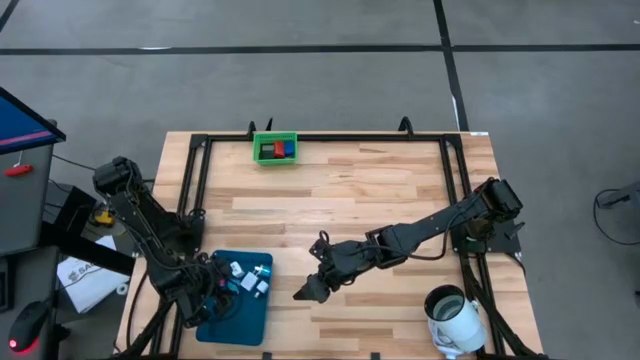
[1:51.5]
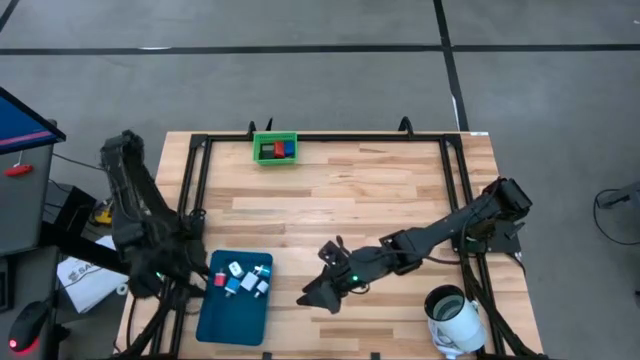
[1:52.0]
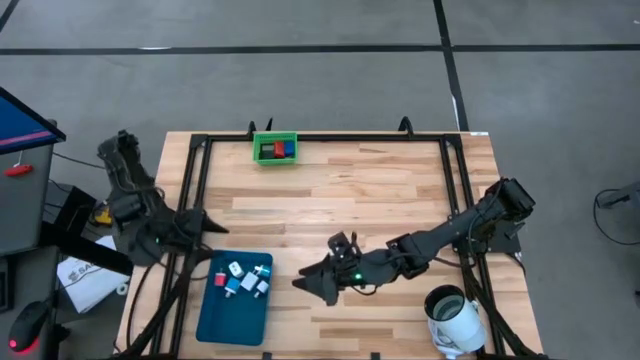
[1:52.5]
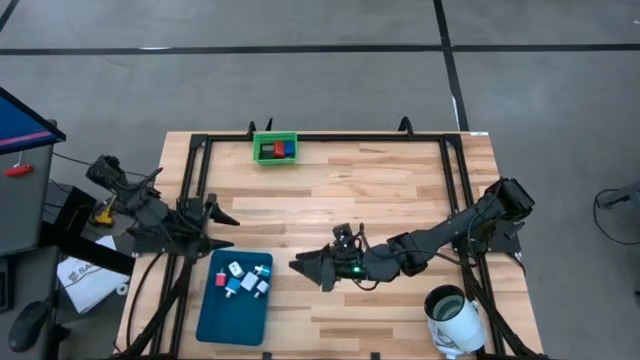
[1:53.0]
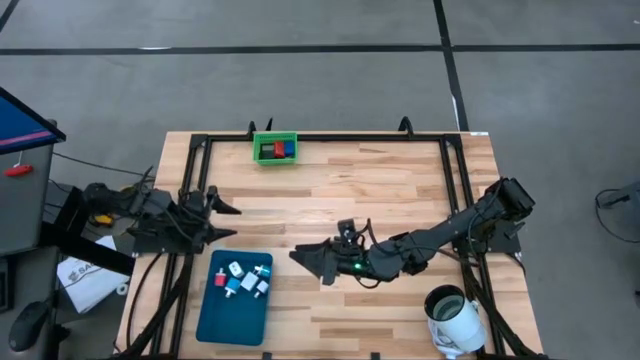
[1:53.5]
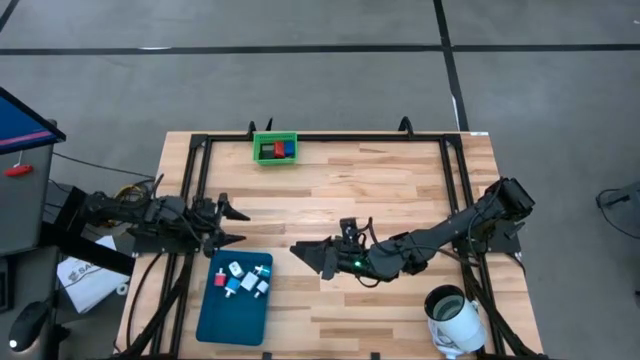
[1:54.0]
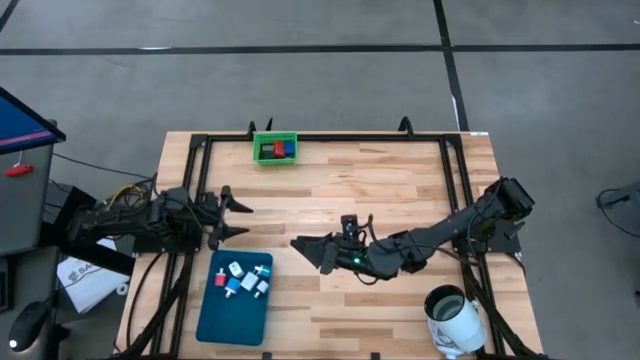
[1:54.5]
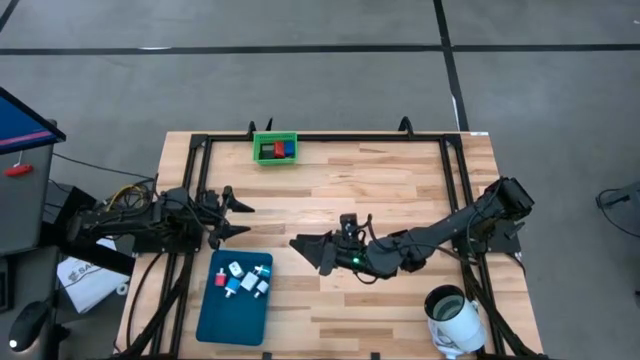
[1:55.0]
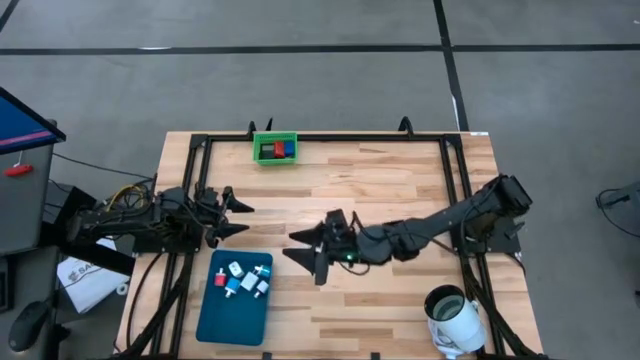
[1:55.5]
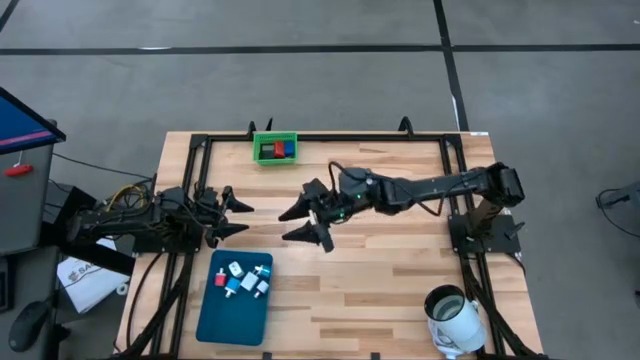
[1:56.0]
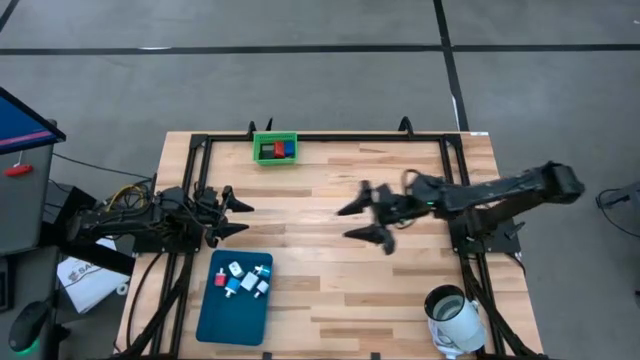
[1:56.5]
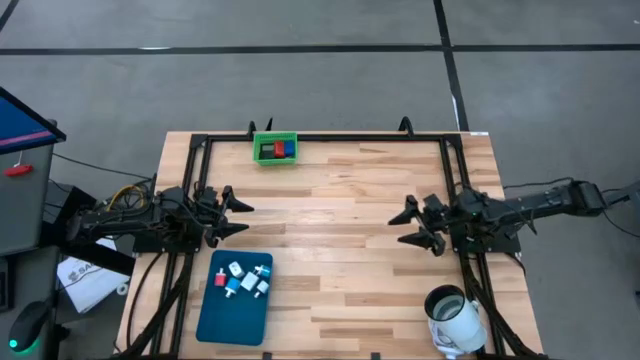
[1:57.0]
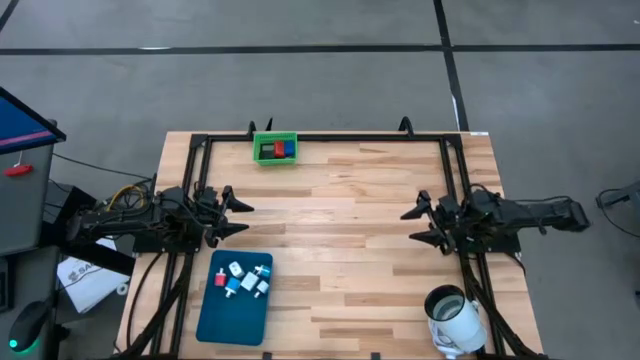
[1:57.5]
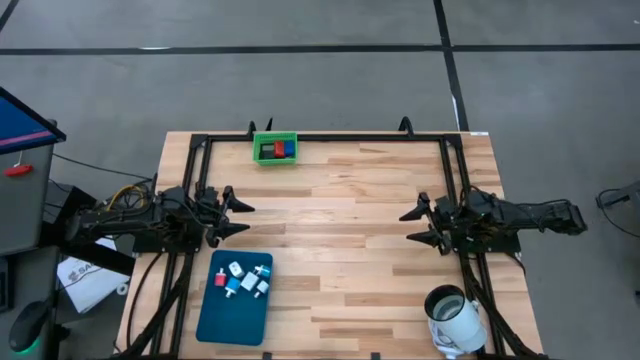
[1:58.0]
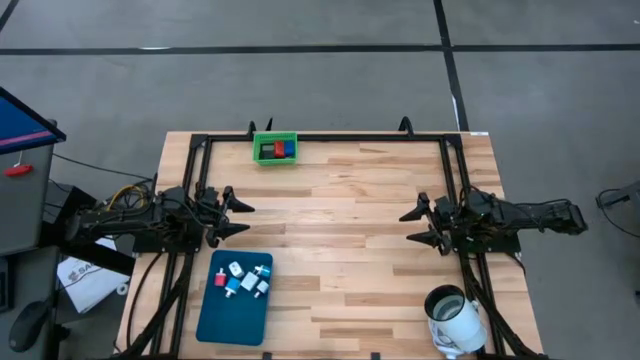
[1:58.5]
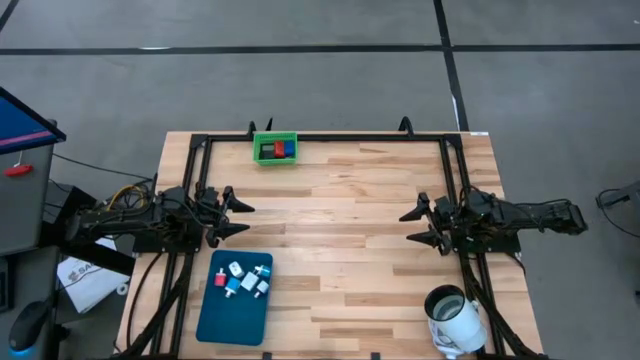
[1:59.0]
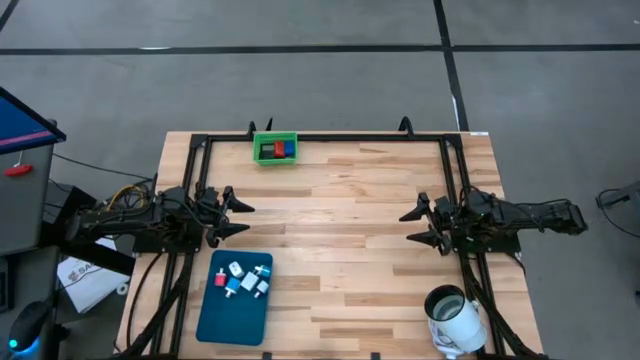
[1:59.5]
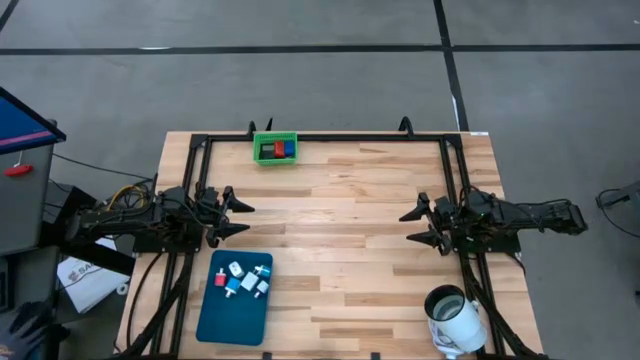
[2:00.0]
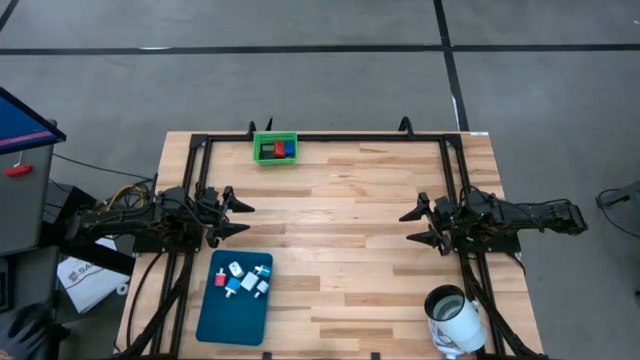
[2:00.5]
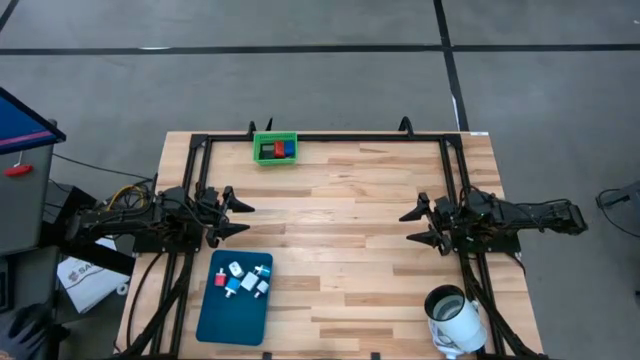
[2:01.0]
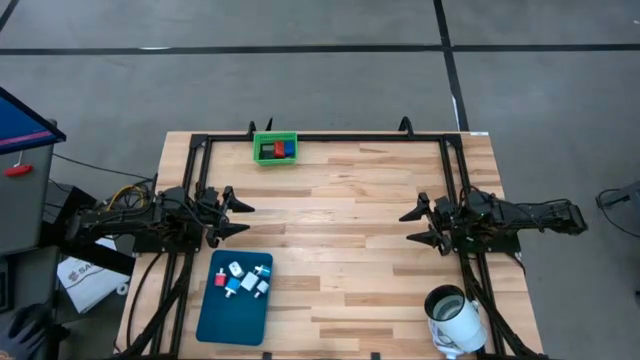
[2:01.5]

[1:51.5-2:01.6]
Task: Pick & Place Office items
Return to Home Position

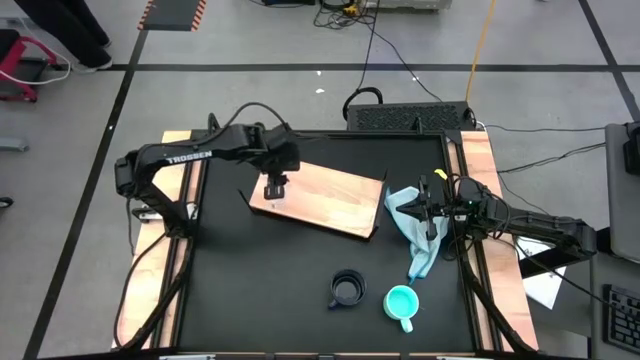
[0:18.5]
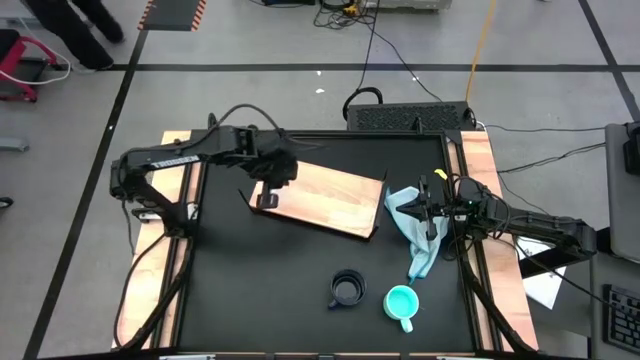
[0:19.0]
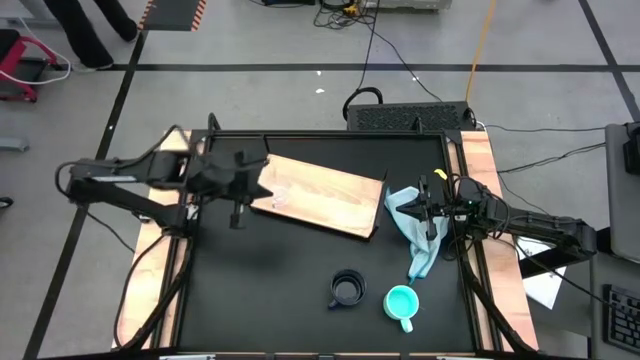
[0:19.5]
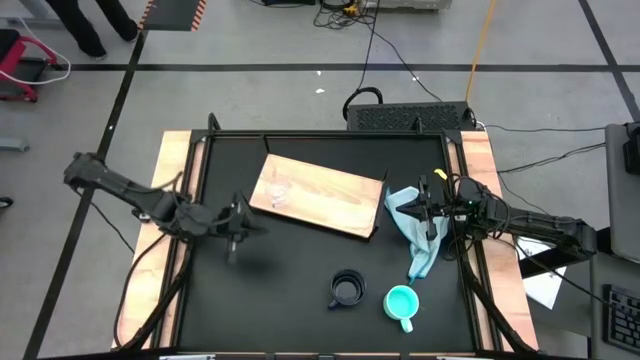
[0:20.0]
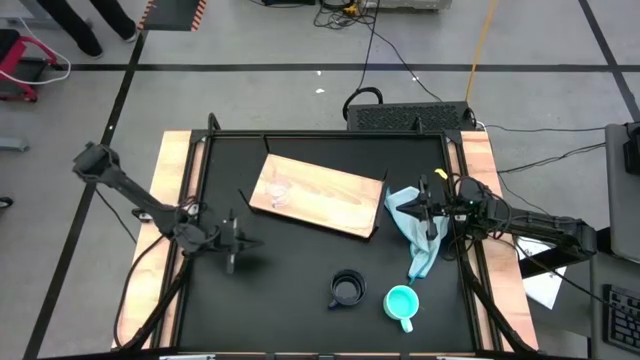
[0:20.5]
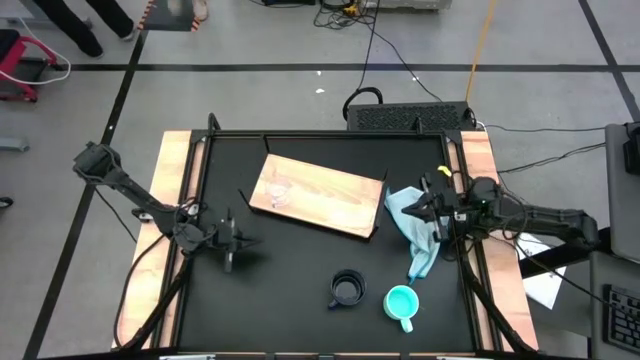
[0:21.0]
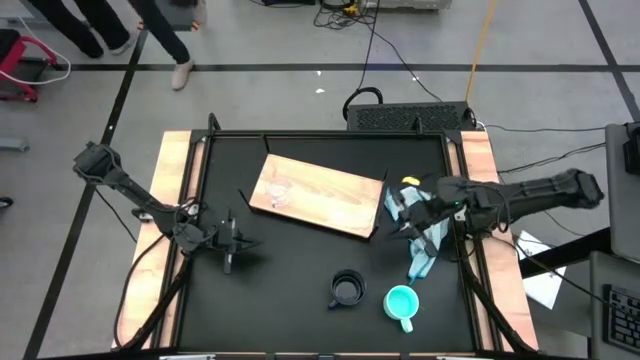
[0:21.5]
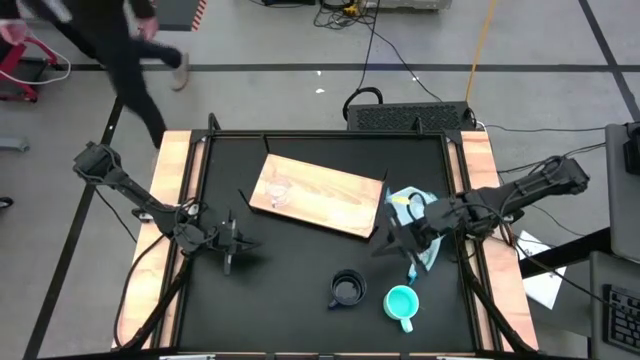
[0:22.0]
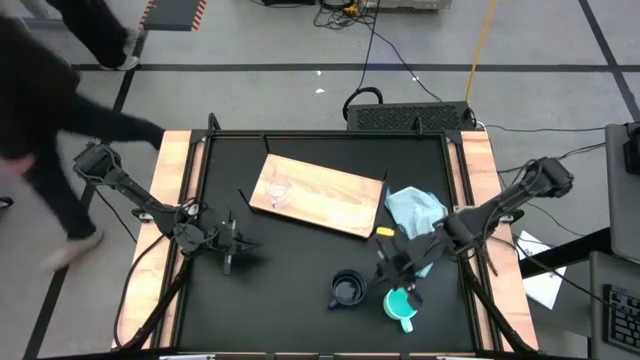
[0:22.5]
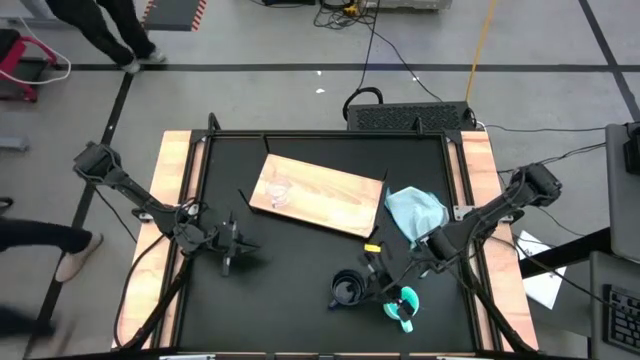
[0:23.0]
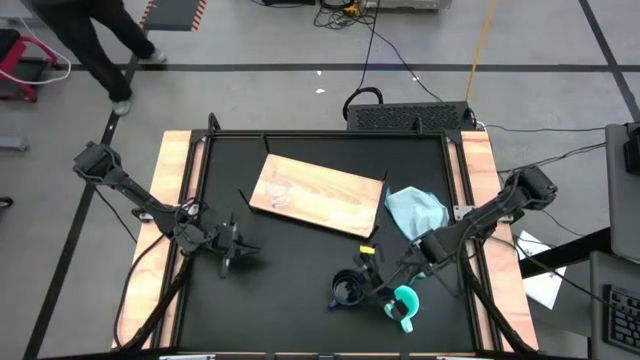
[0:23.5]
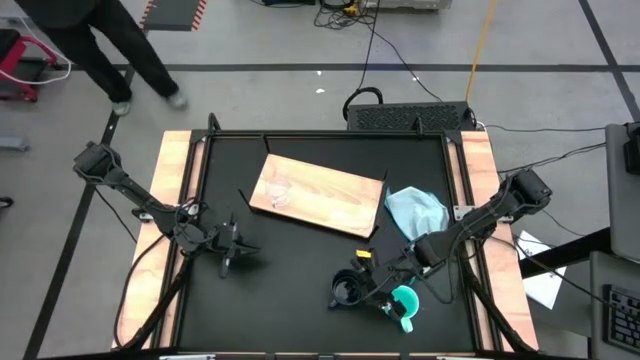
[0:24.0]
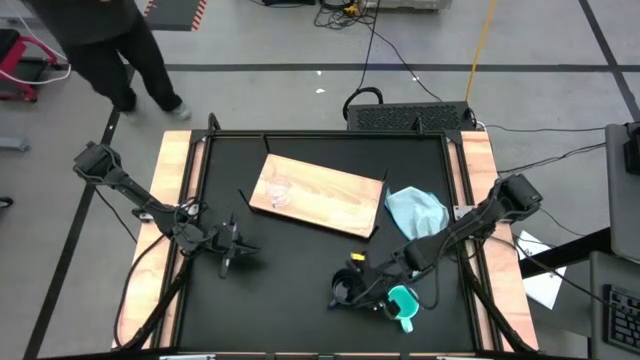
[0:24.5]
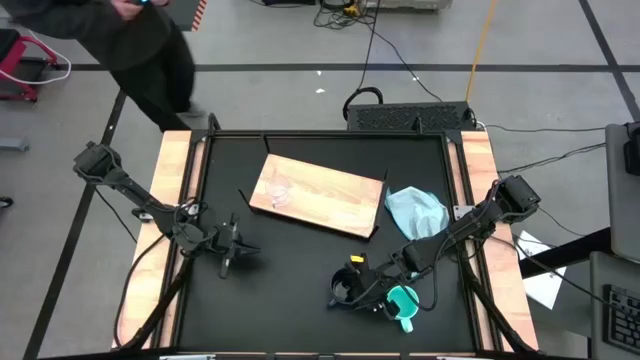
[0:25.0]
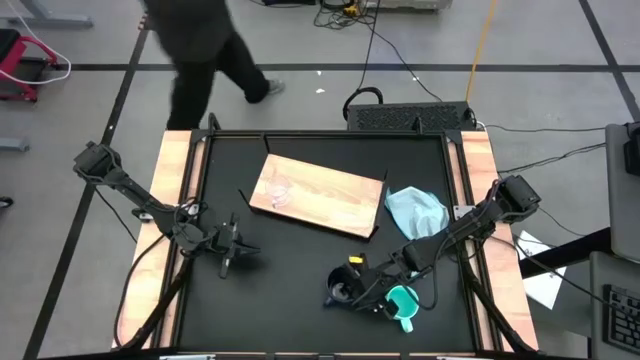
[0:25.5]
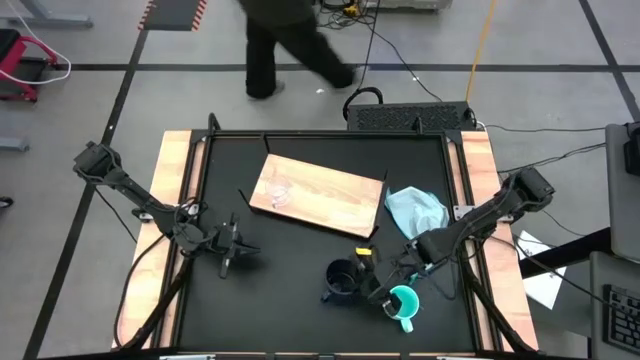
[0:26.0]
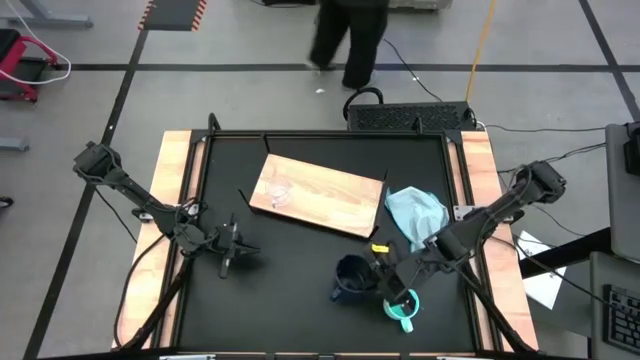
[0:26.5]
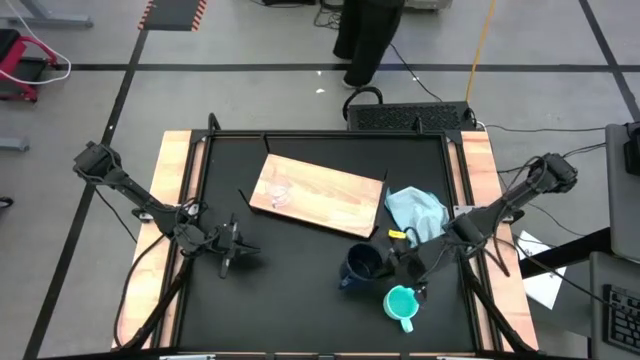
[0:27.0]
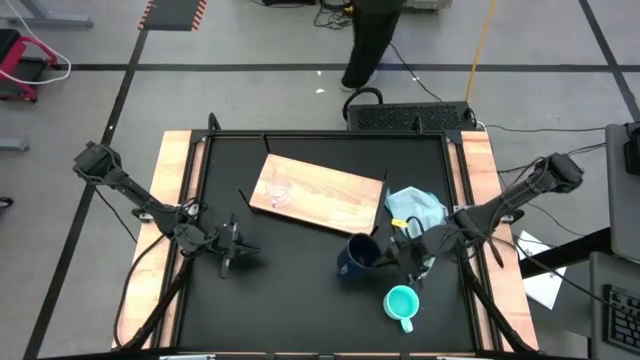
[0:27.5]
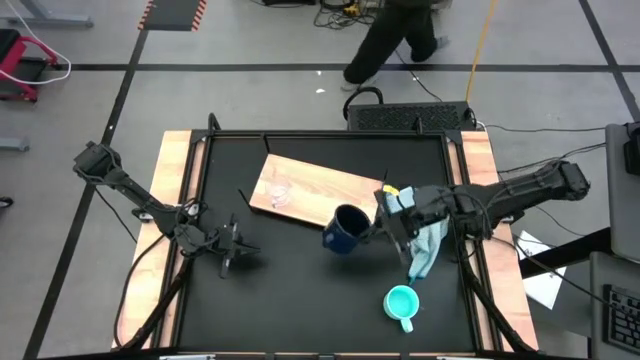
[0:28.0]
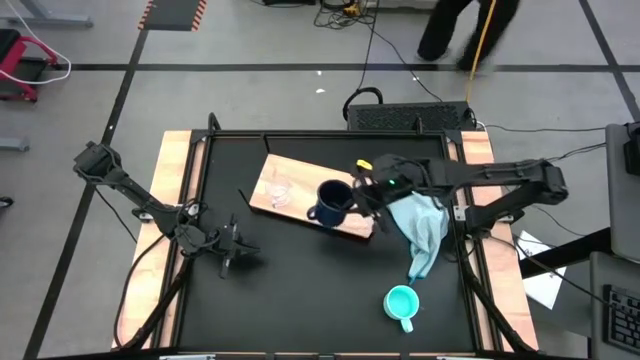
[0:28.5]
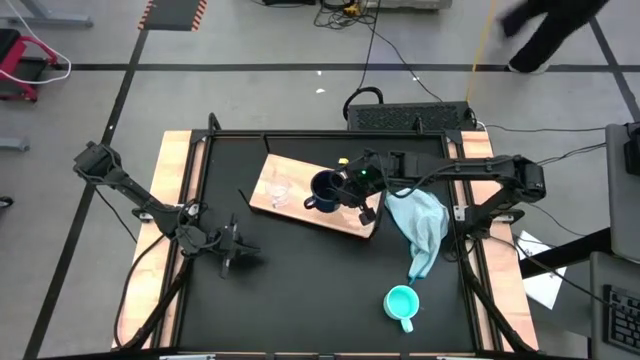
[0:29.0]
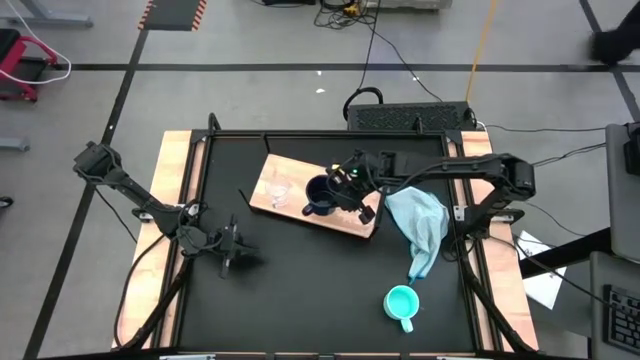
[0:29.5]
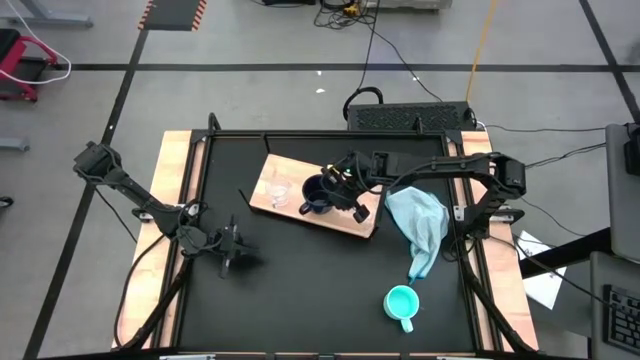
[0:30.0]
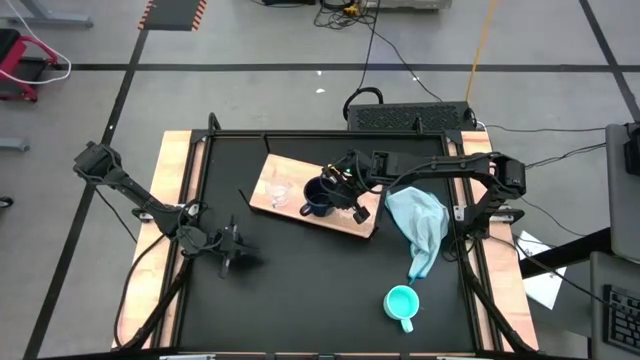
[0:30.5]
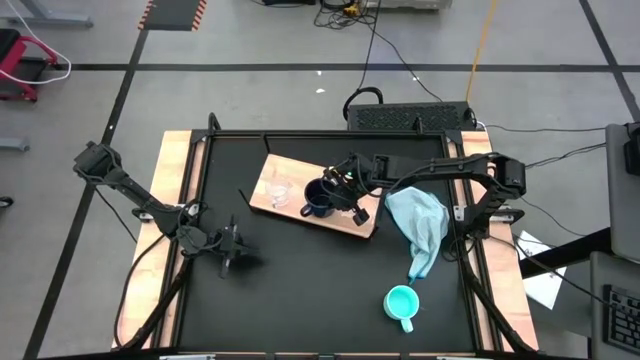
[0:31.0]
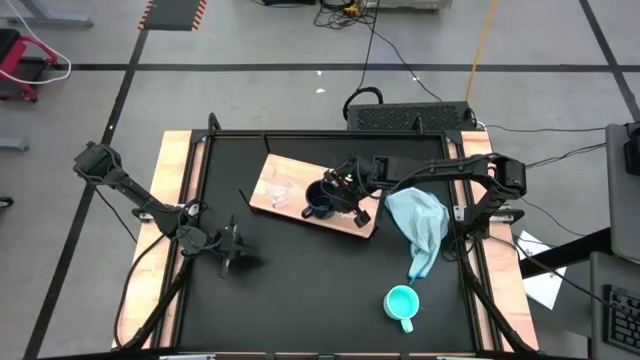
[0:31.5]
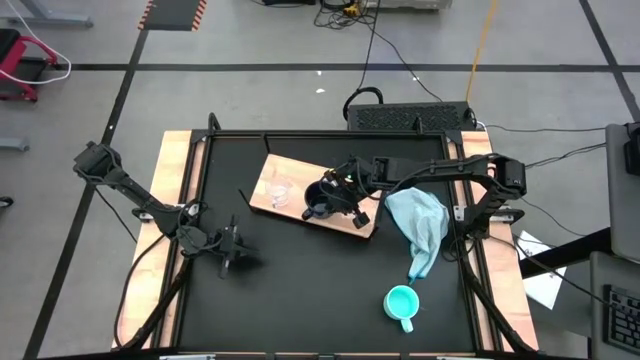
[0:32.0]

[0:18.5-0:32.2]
Task: Stack small to large cups/mugs on shelf
Put the dark blue mug on the shelf
